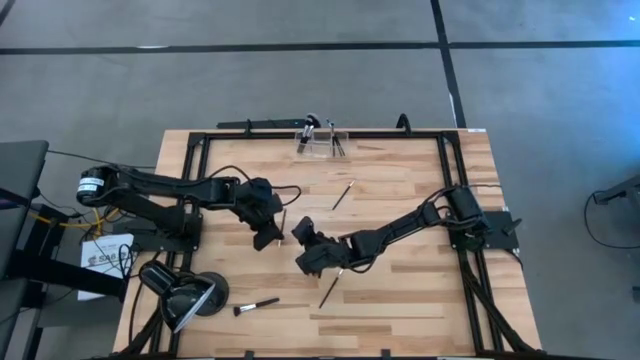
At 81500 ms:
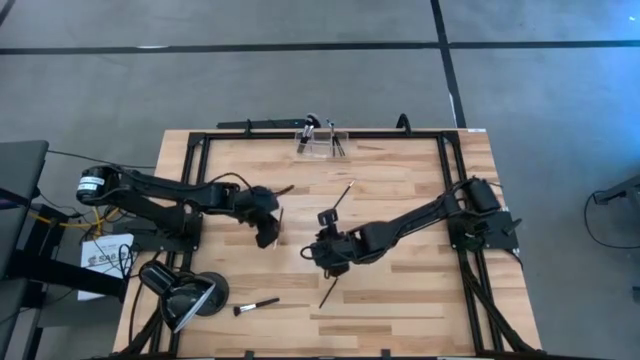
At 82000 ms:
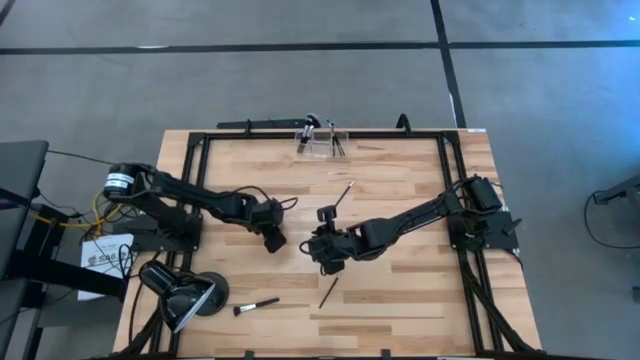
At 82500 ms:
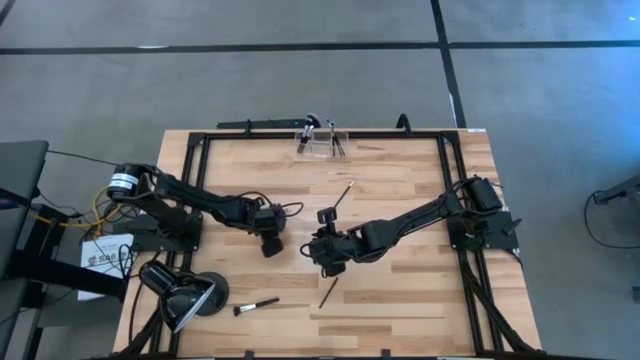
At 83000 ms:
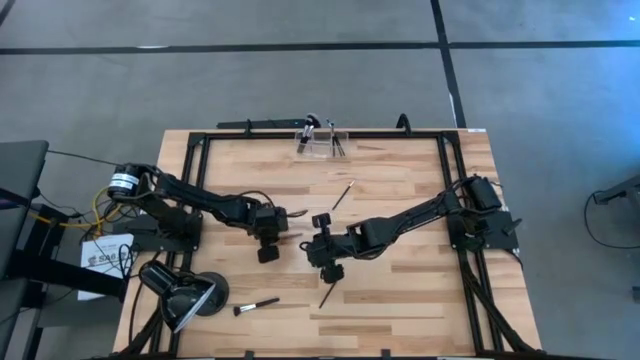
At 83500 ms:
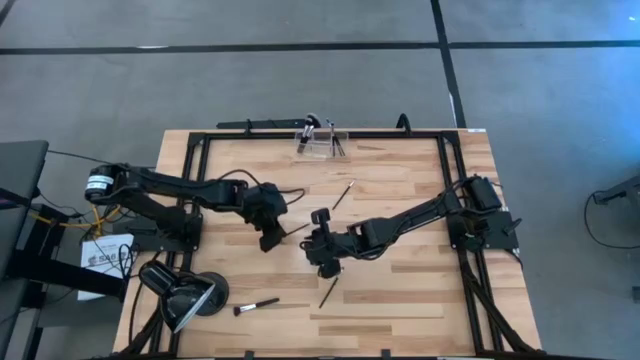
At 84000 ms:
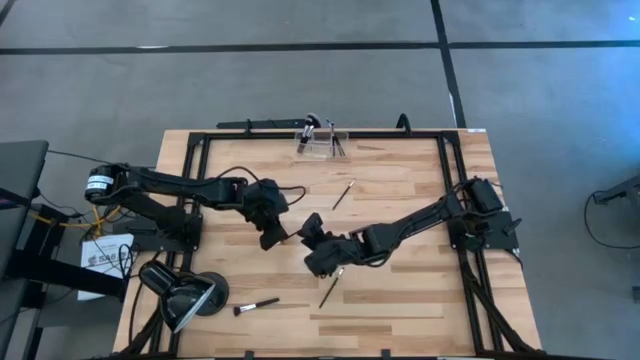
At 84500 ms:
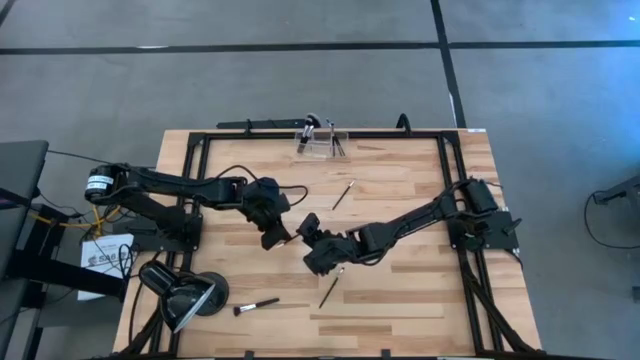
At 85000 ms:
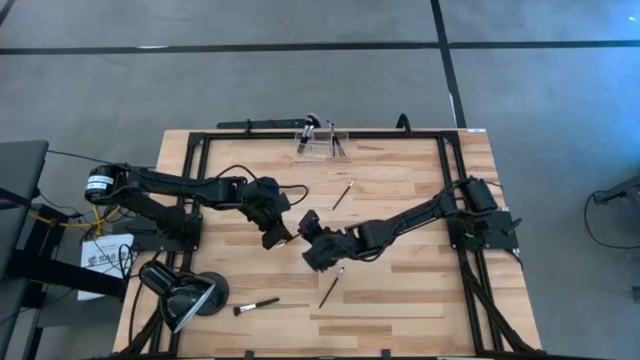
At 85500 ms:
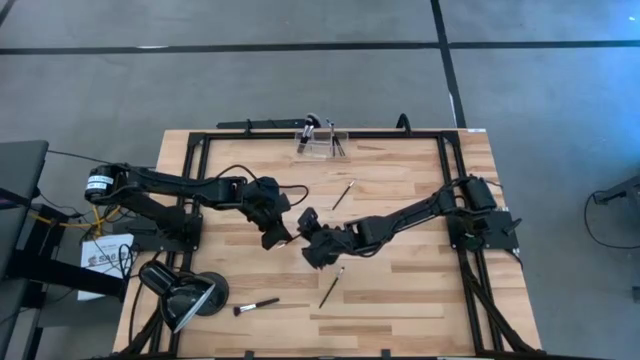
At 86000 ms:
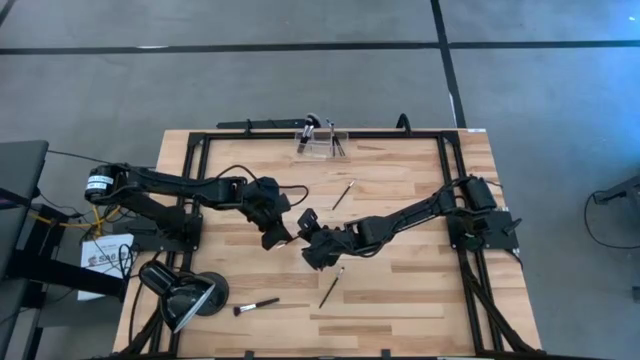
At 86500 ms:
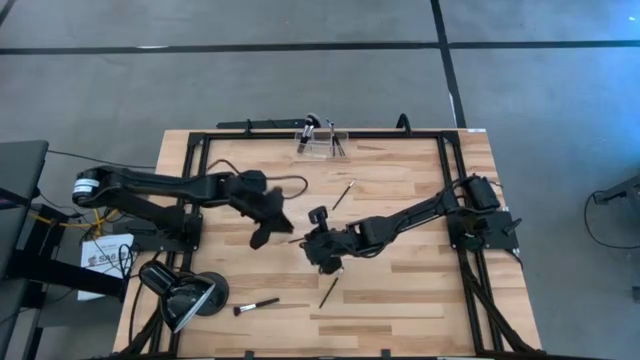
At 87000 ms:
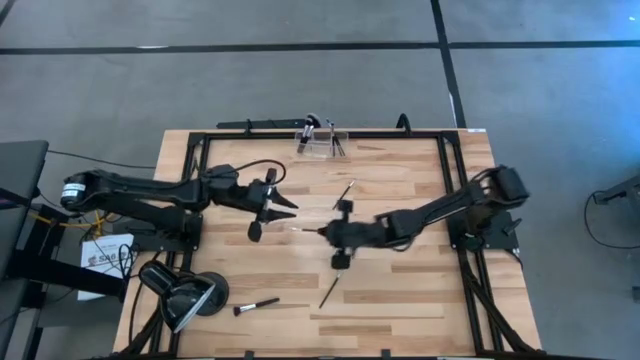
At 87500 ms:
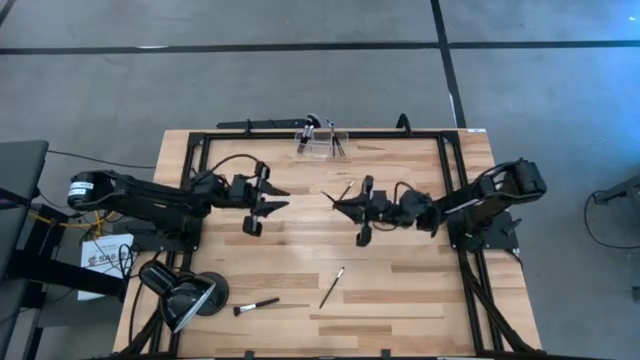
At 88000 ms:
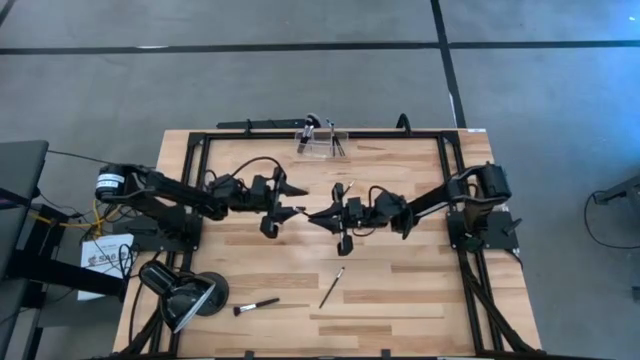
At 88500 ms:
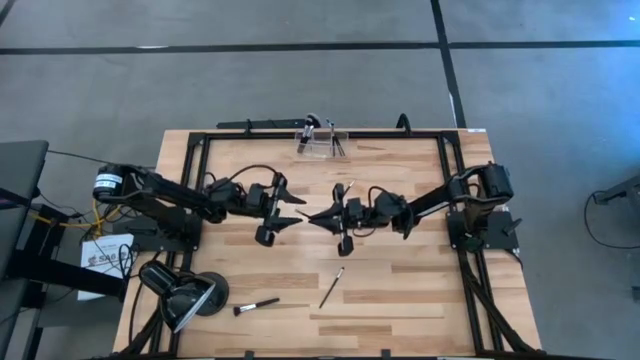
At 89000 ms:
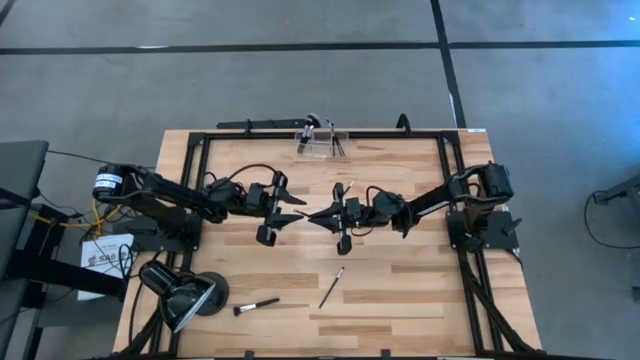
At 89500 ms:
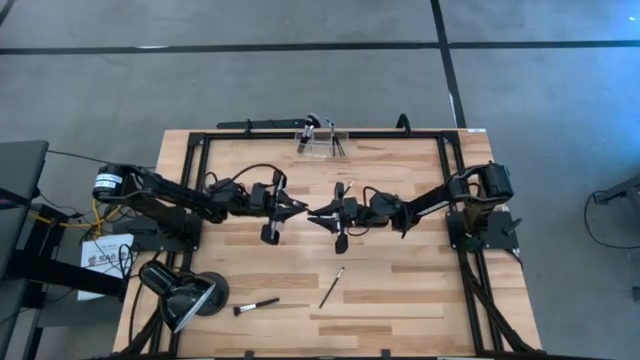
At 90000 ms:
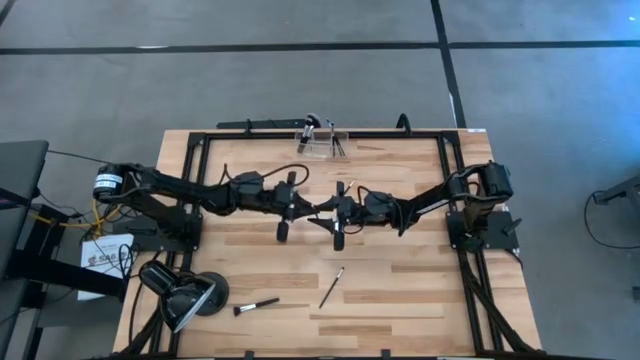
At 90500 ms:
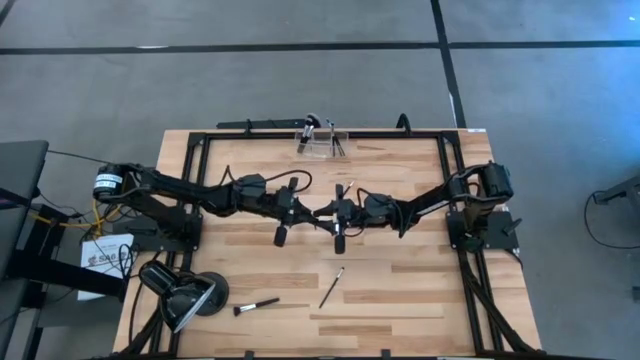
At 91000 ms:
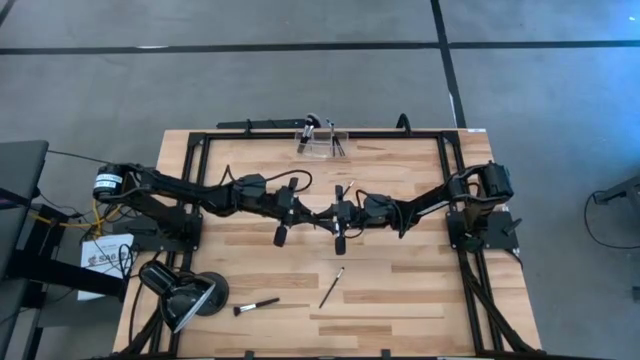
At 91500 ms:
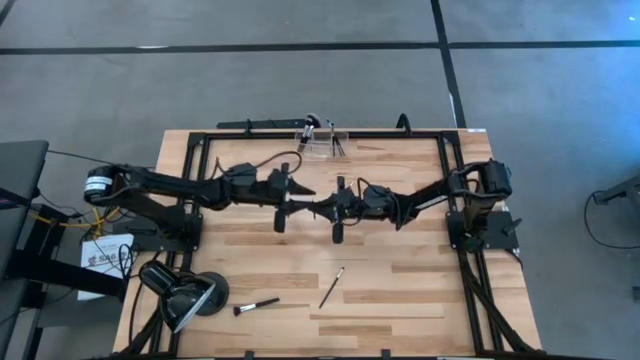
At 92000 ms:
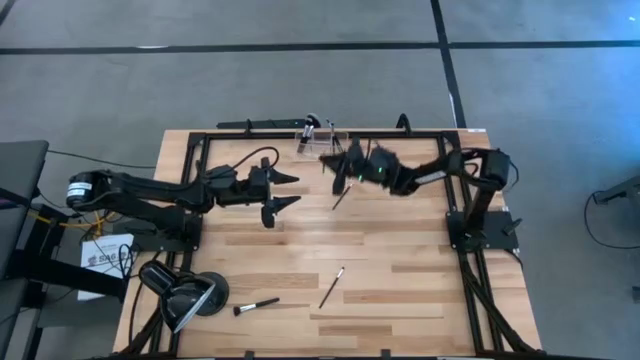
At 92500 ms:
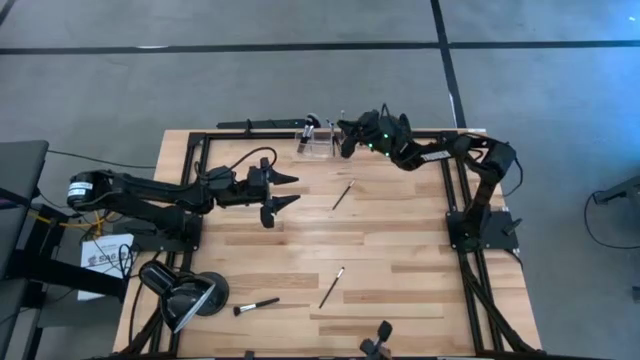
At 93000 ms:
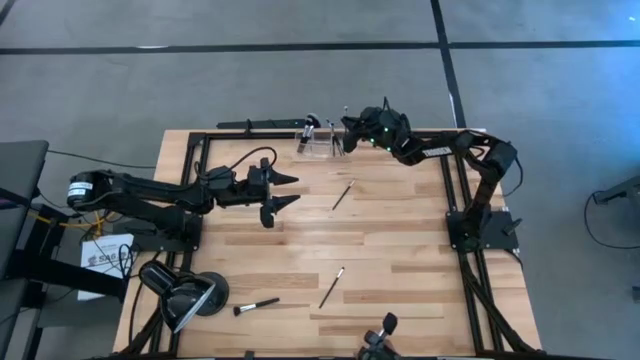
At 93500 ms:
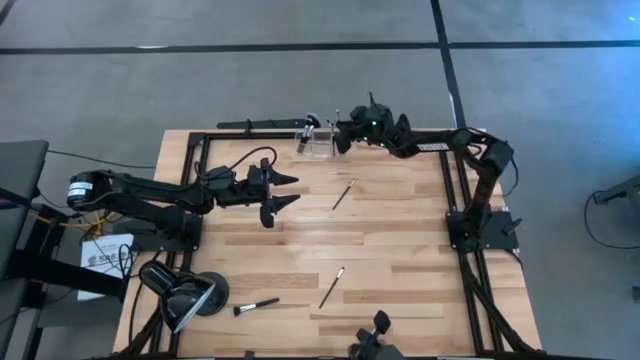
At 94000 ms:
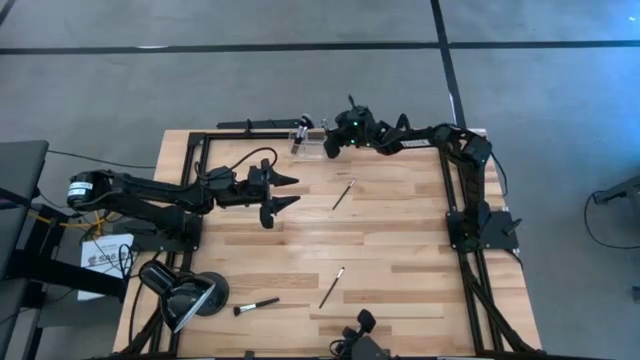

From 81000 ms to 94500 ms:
Task: Sort items
Put the eyeshadow brush into the right section of the transparent organizer

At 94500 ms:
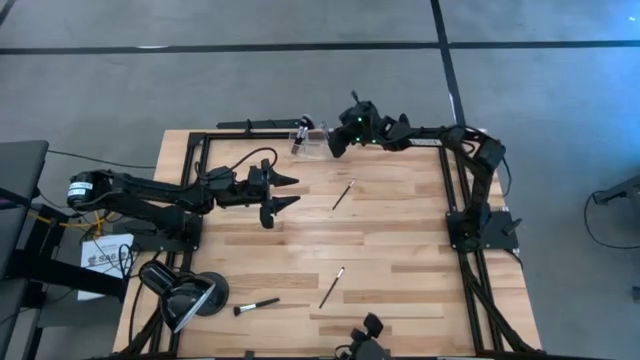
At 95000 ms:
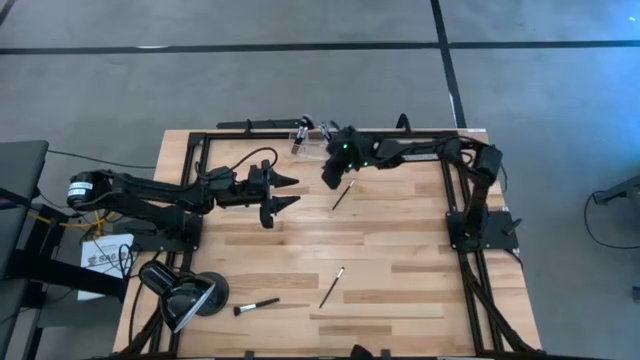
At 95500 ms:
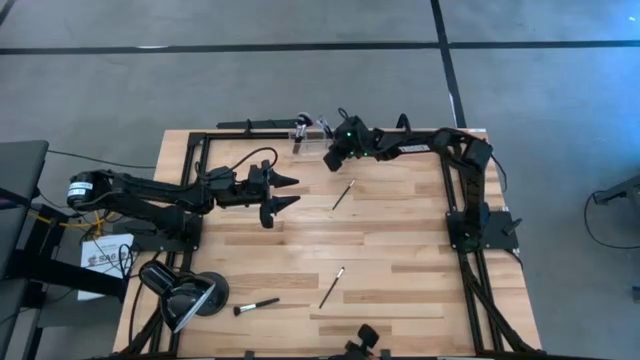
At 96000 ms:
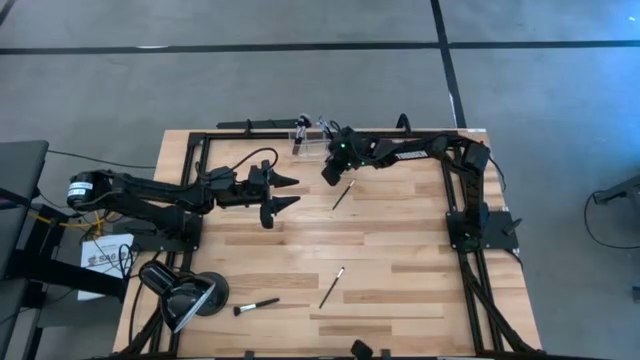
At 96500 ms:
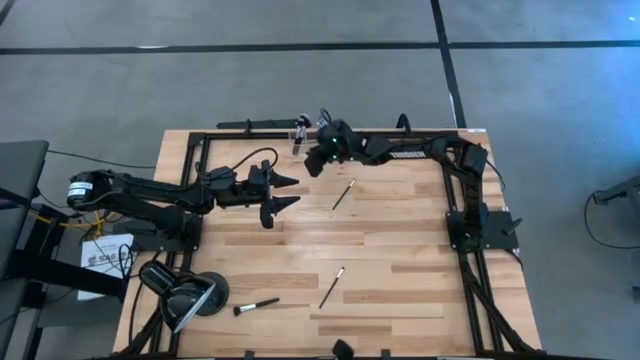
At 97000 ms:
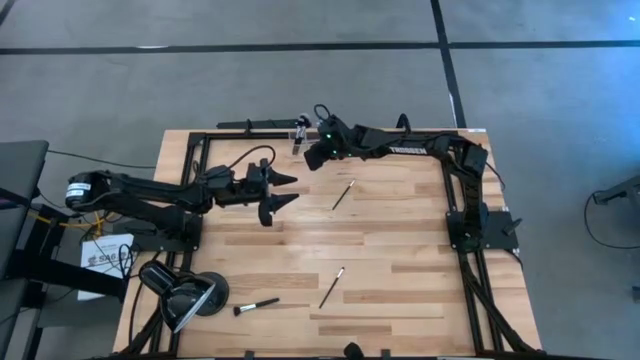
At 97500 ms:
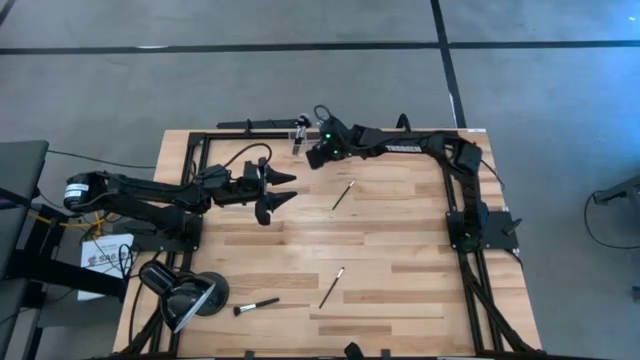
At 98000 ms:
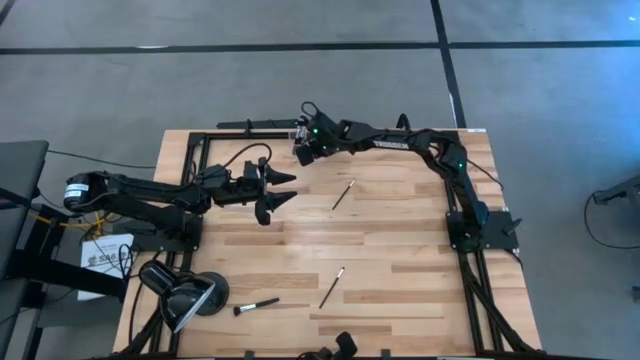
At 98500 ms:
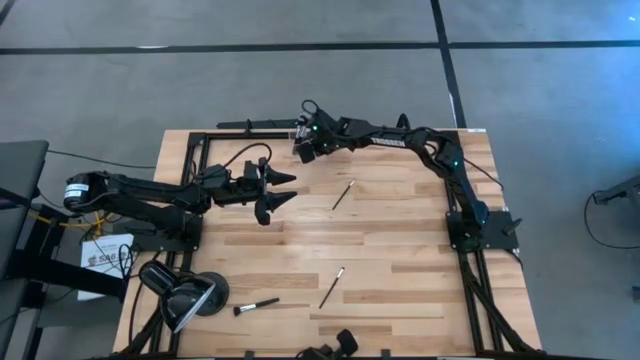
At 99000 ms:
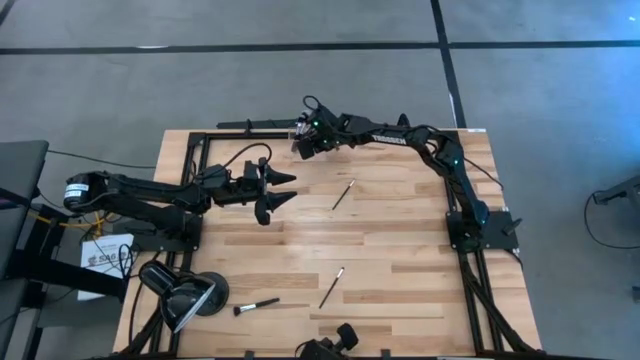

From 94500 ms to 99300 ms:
Adjust the transparent organizer

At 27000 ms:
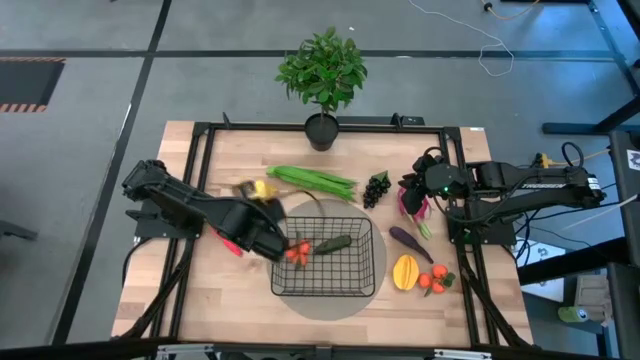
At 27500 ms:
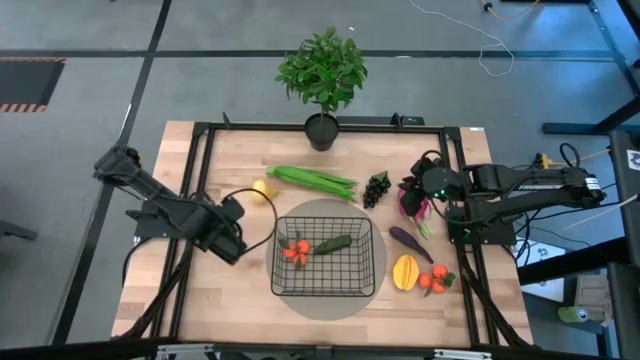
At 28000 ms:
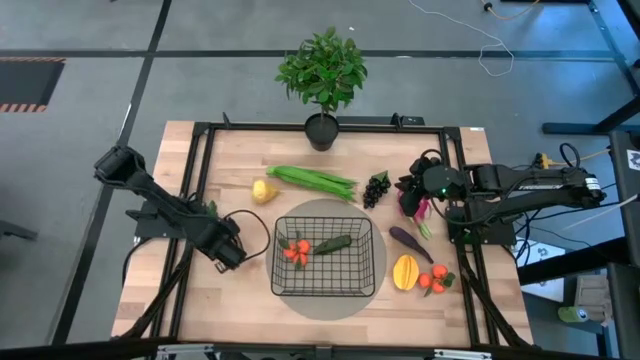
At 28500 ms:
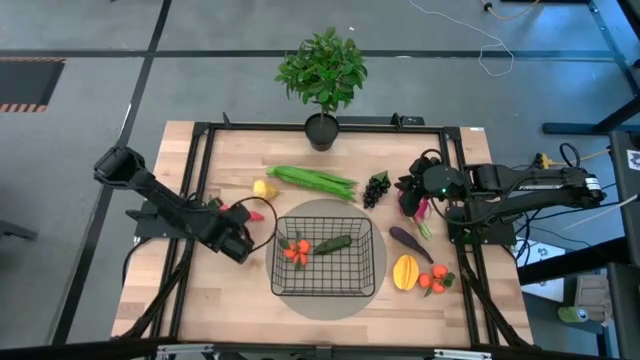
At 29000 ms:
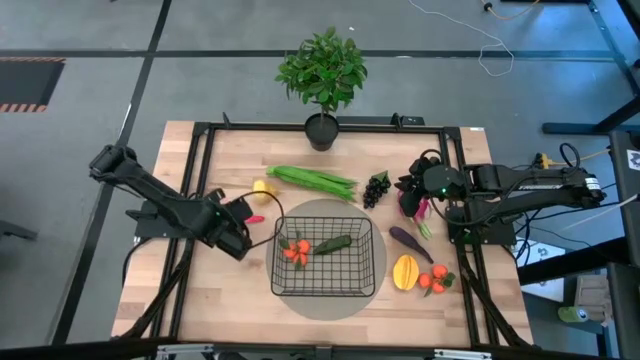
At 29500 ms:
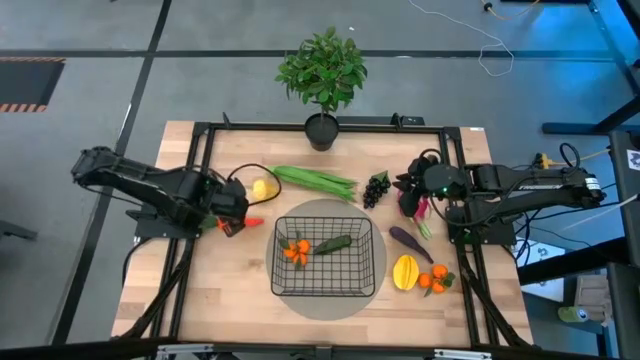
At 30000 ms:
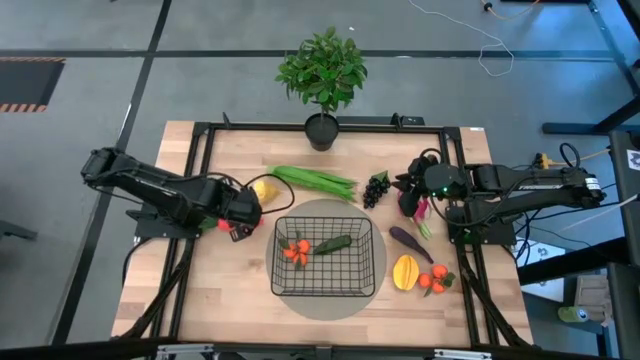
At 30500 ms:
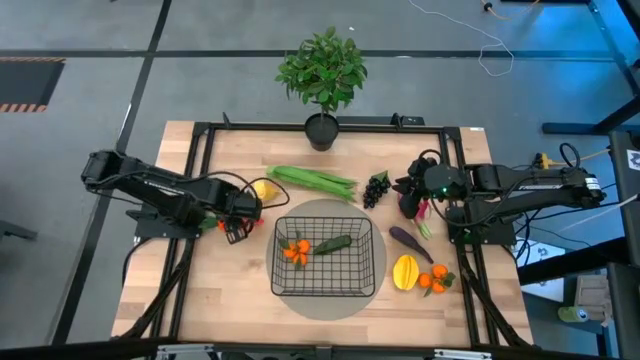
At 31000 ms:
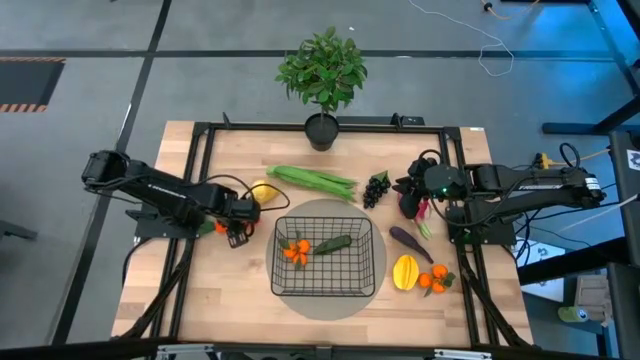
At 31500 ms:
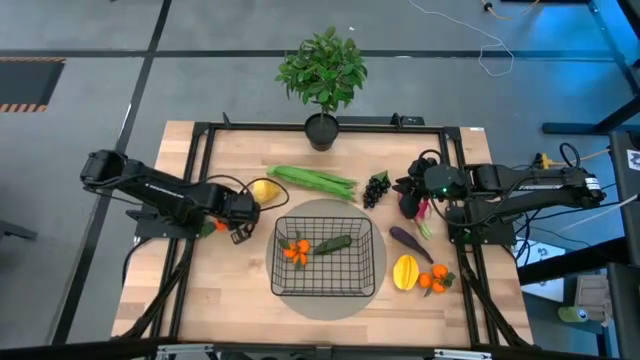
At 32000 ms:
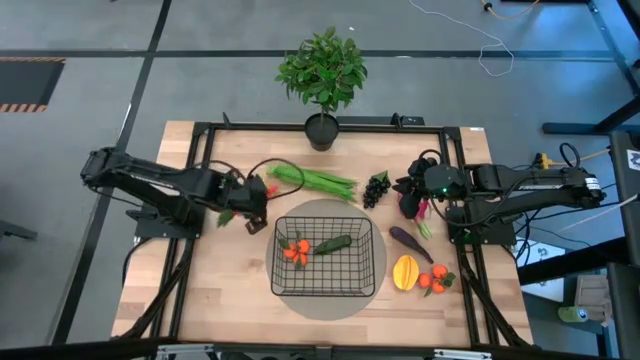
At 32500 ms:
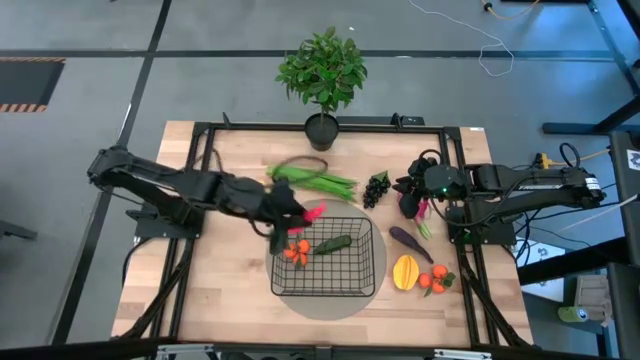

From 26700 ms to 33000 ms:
Task: Build produce basket
Put the carrot into the black wire basket
